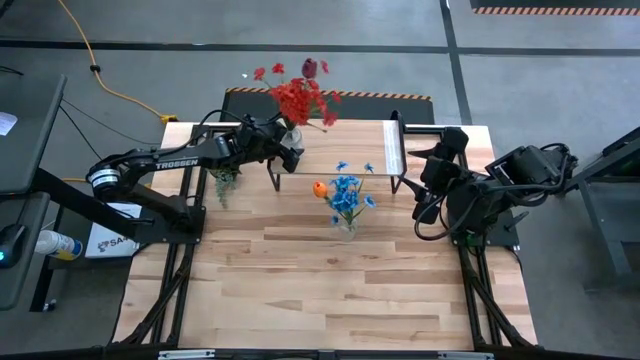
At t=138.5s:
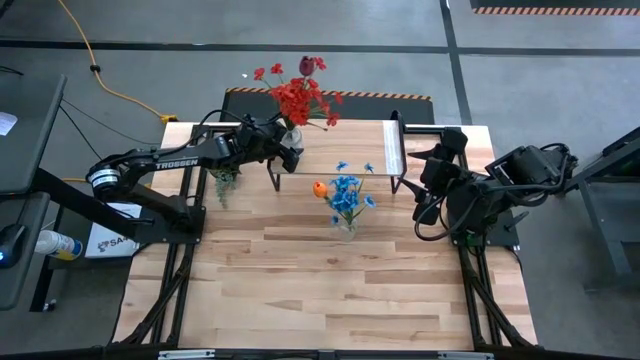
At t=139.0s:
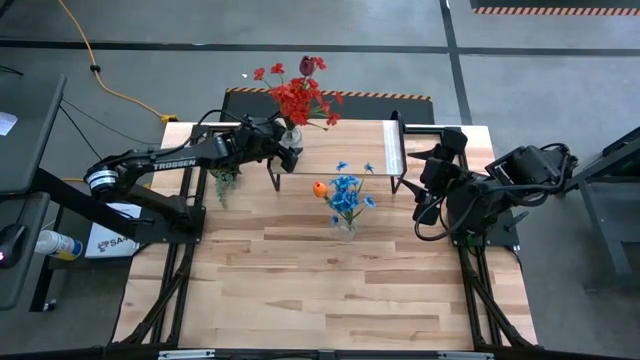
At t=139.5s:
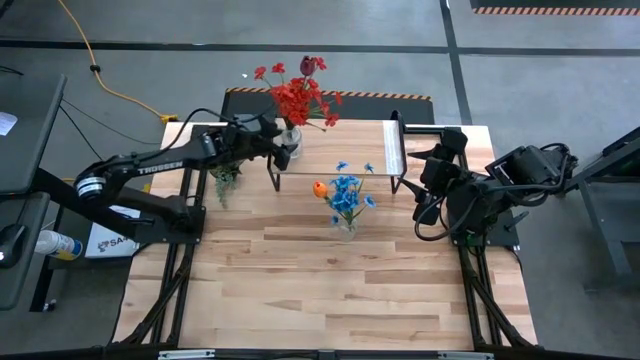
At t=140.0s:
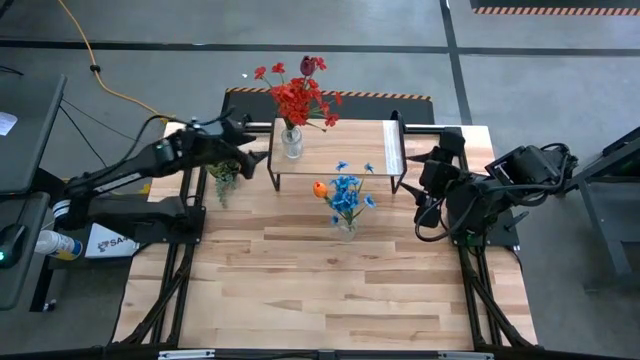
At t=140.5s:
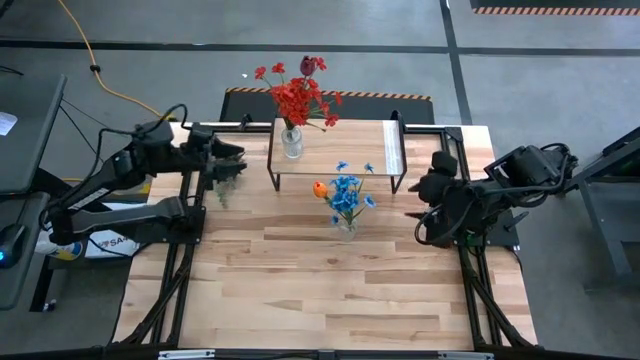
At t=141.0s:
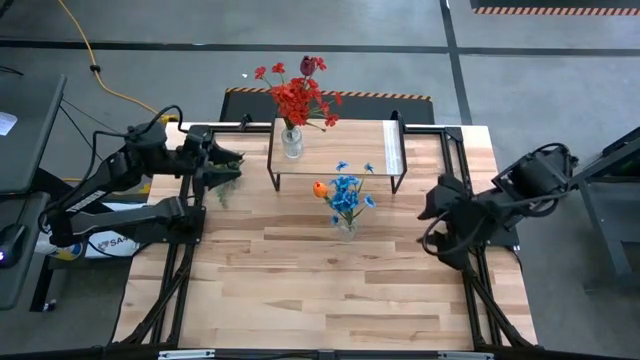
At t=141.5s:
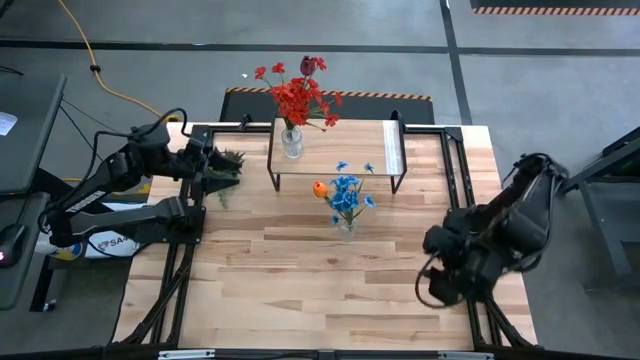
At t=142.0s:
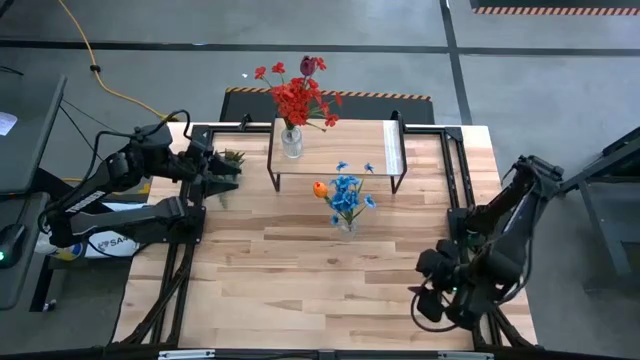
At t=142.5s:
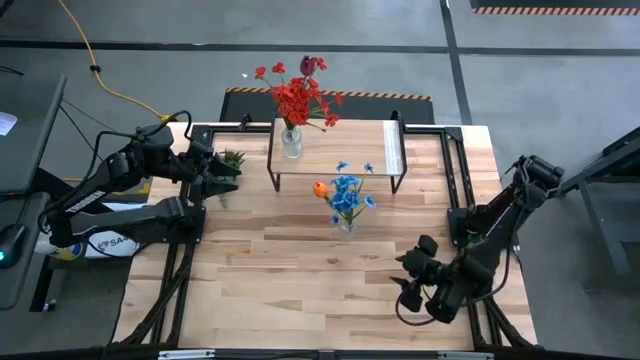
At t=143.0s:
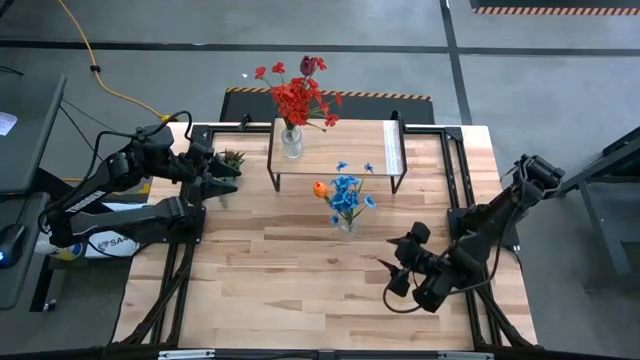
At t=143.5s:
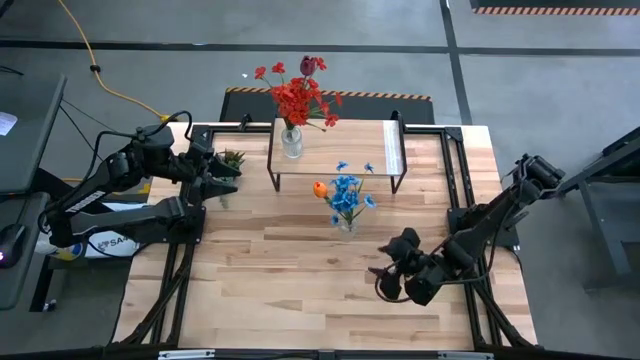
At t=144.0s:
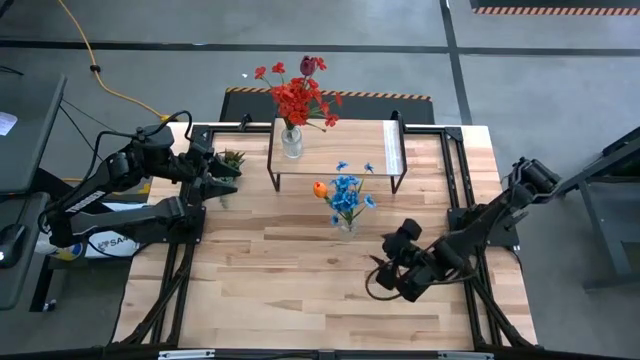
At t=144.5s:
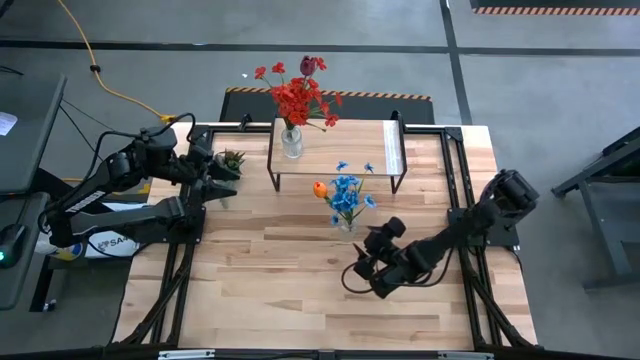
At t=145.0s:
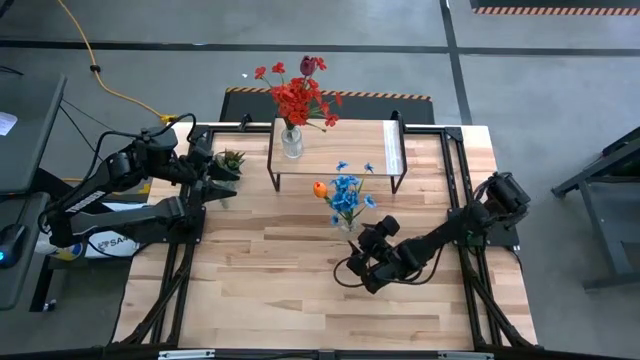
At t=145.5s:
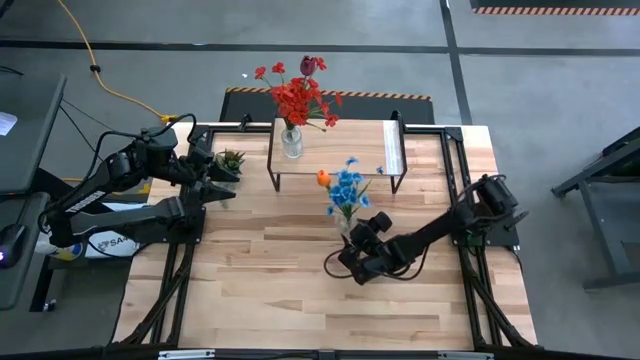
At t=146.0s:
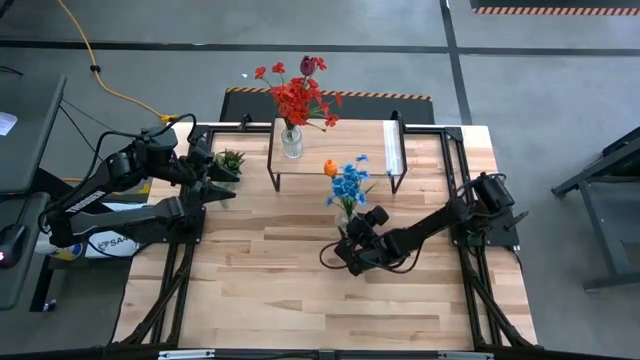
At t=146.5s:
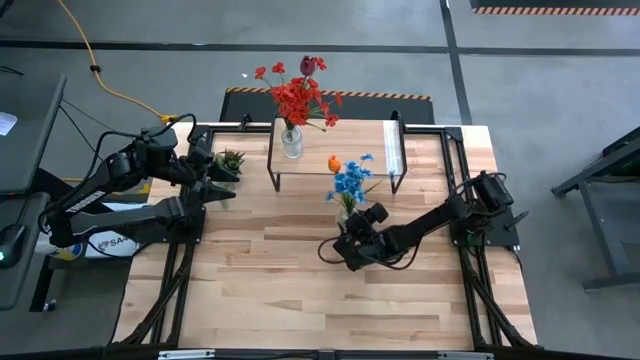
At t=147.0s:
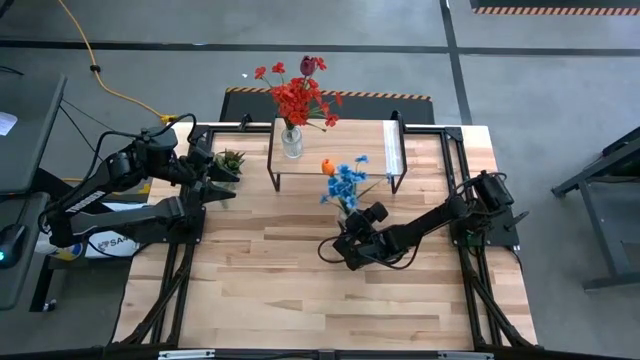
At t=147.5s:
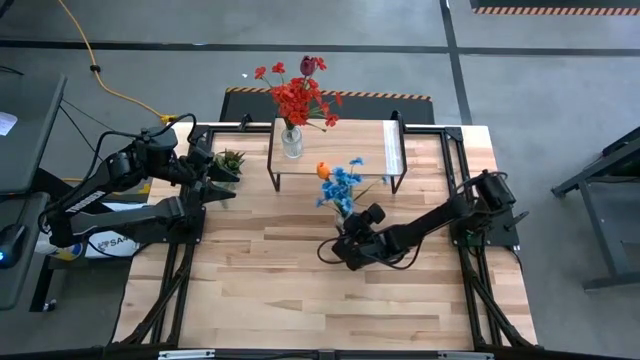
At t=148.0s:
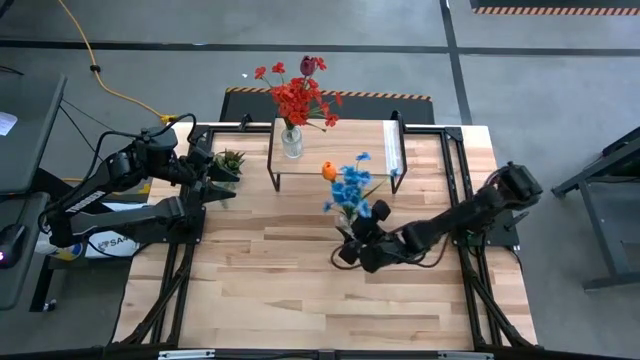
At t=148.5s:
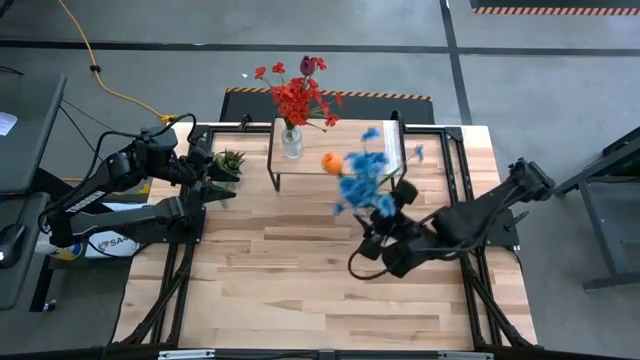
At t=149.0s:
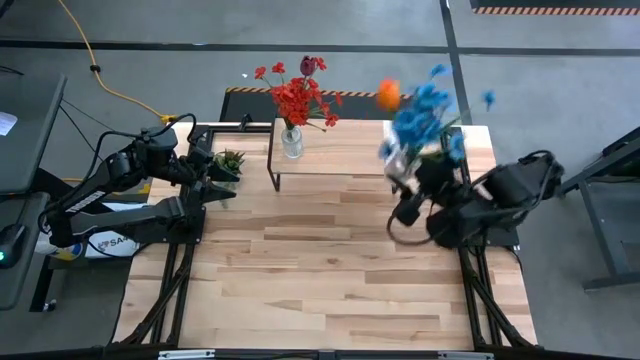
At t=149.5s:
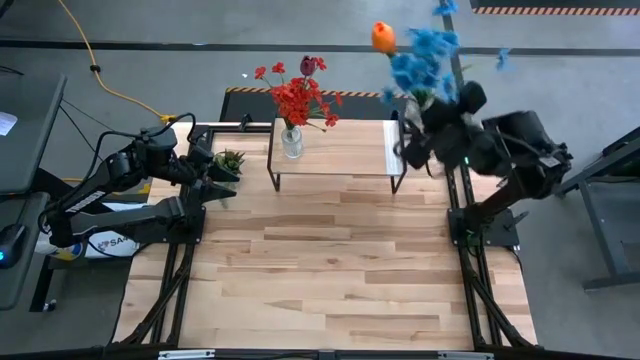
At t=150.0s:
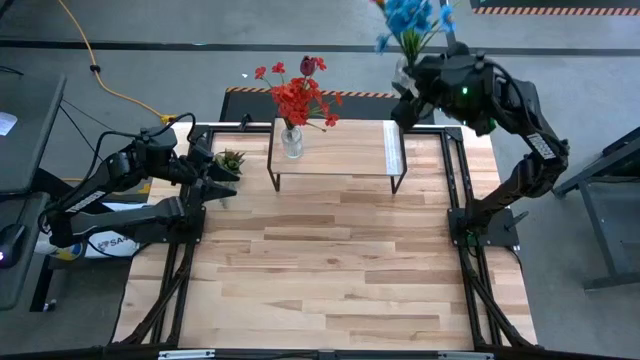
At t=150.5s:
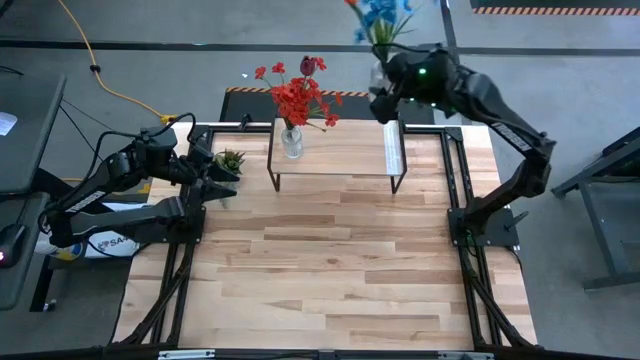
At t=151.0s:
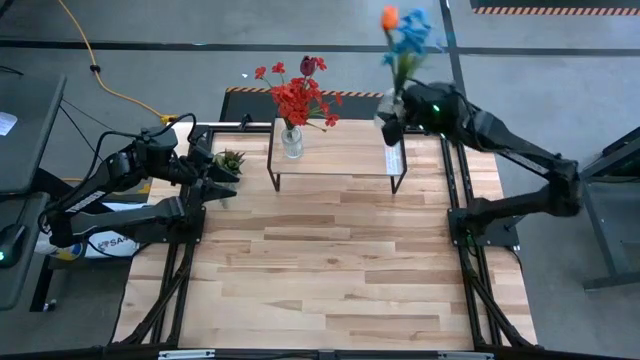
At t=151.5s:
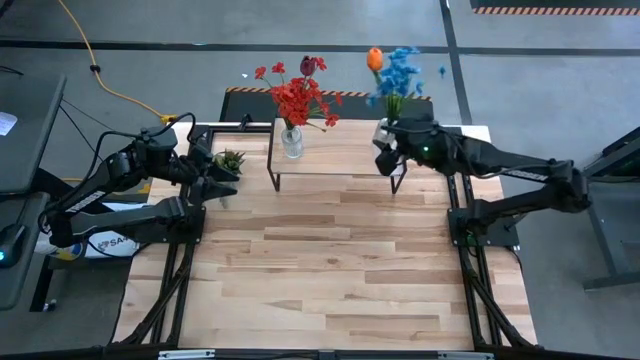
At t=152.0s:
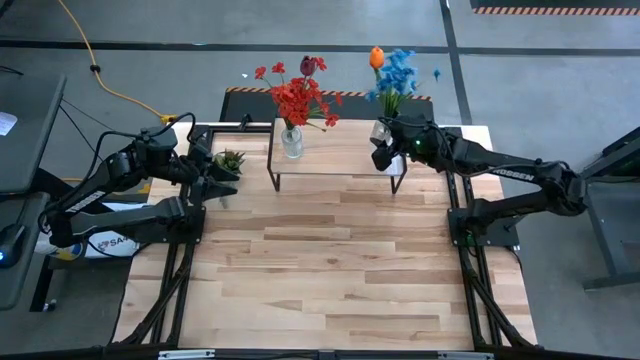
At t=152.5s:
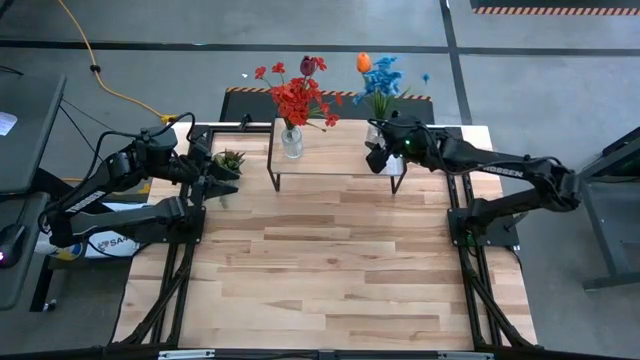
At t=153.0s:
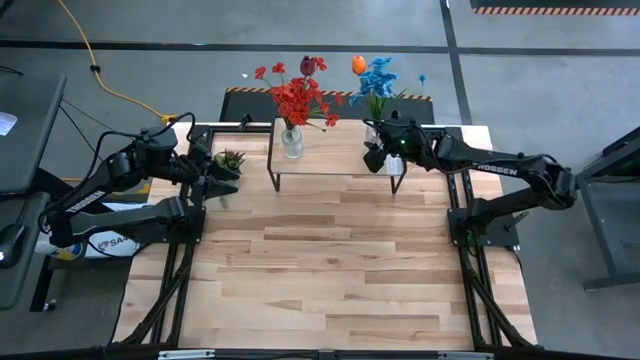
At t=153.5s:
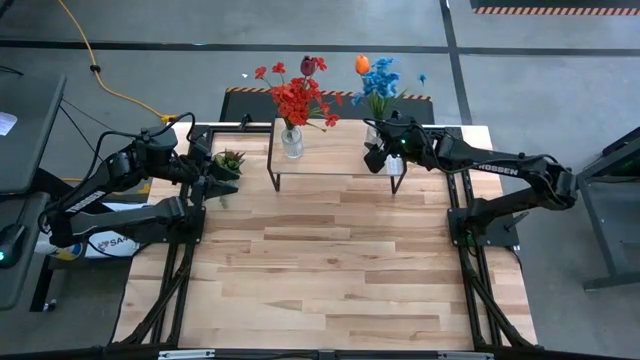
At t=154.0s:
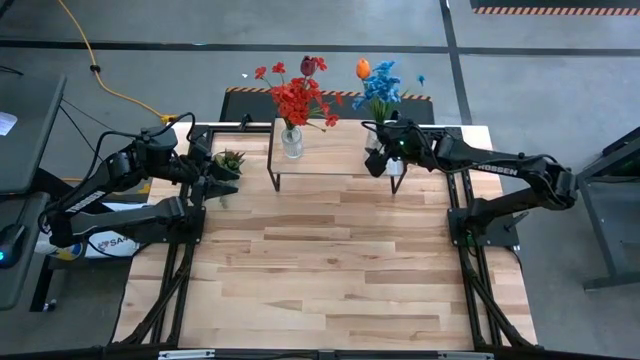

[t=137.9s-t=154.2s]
Task: Pick and place flowers into a vace then onto a shelf
Put the transparent vase on the shelf

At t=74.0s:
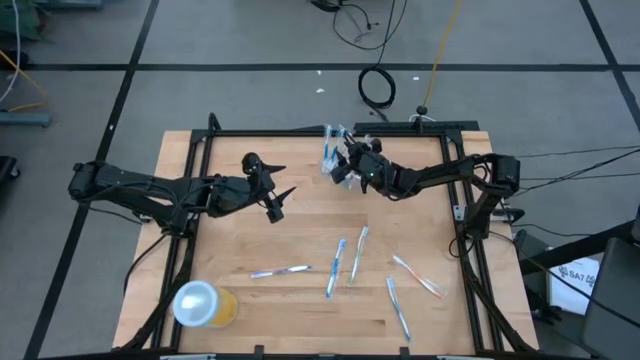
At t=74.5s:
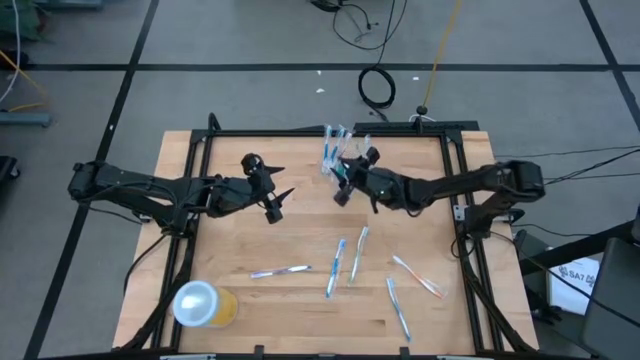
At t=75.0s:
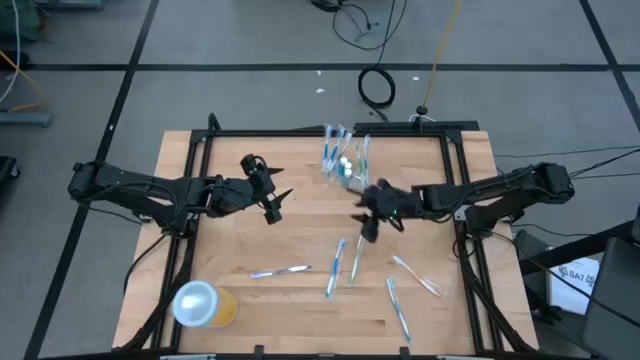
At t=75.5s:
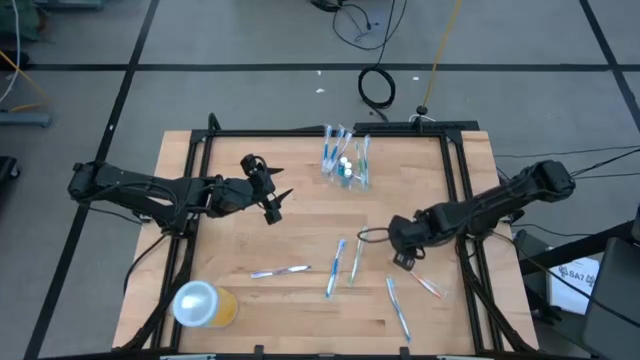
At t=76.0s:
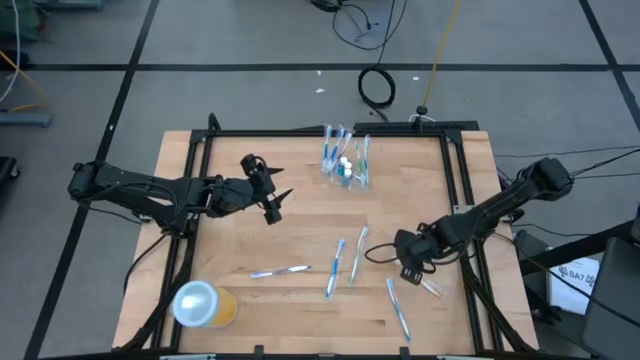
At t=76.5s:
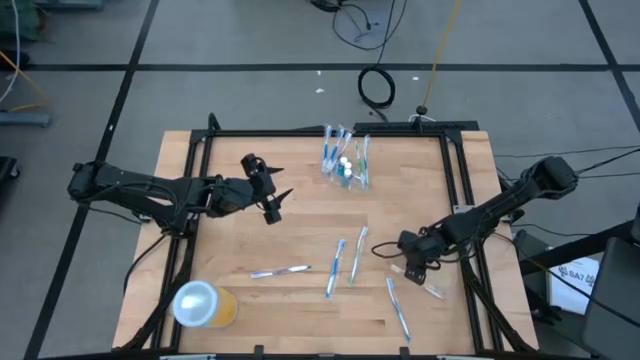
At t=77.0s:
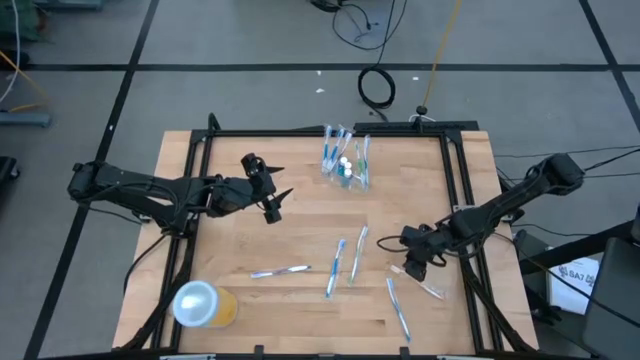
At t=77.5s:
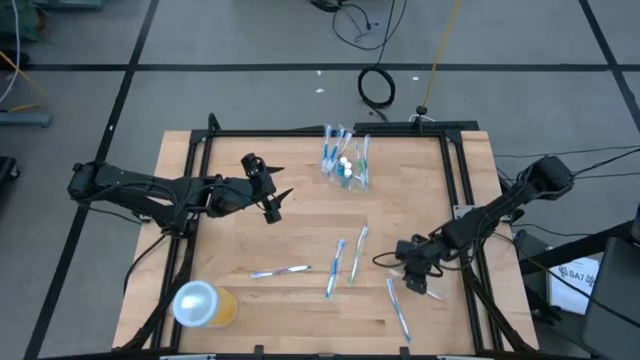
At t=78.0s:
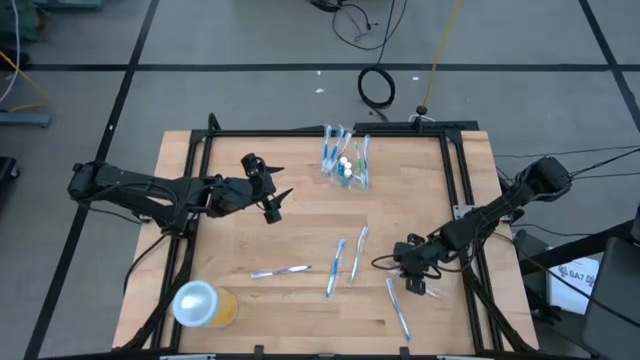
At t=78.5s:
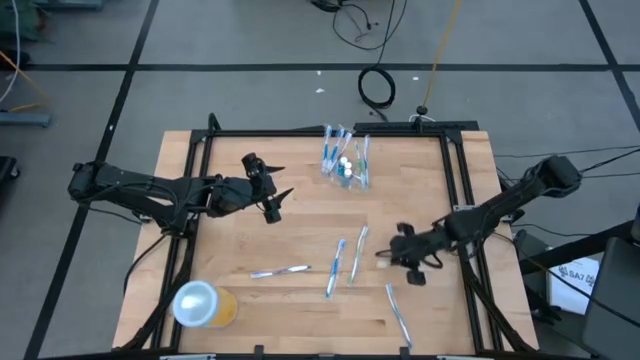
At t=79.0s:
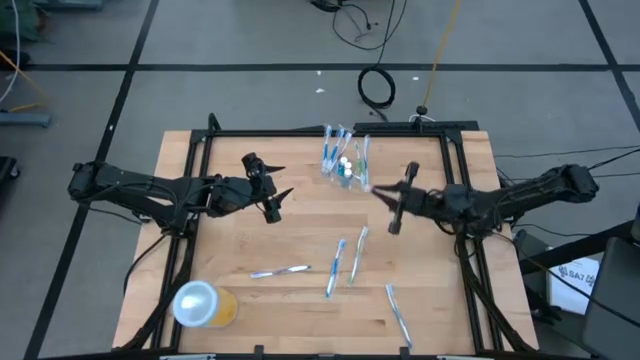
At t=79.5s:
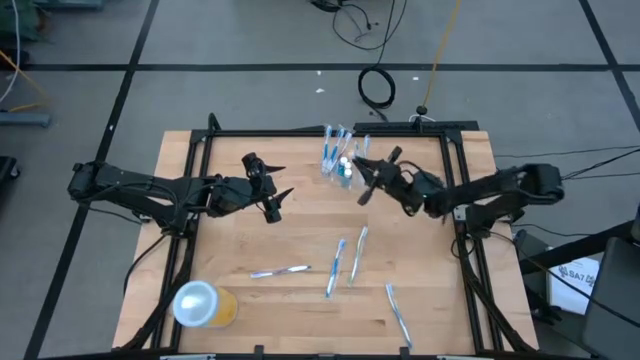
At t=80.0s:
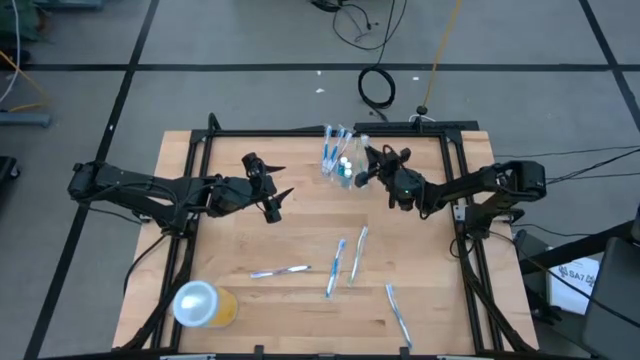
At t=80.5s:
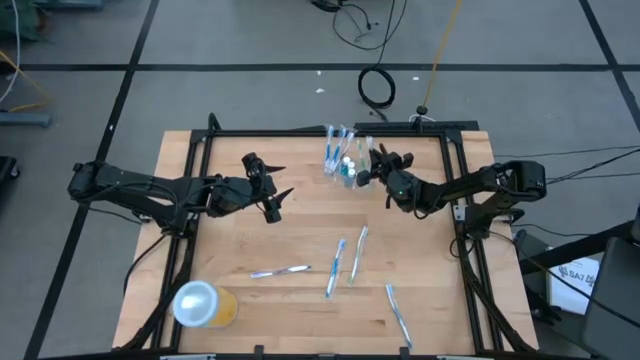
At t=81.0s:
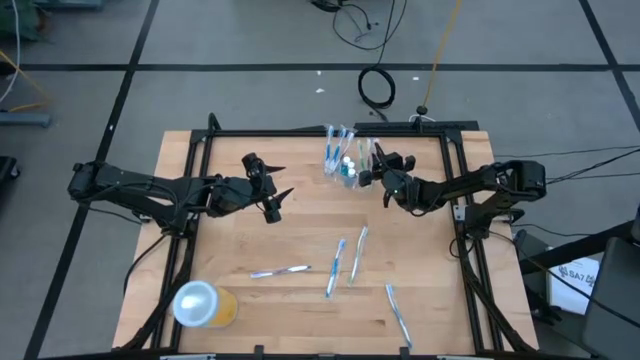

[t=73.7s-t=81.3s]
Task: Pick & Place toothbrushing station
Put the orange toothbrush into the transparent organizer
